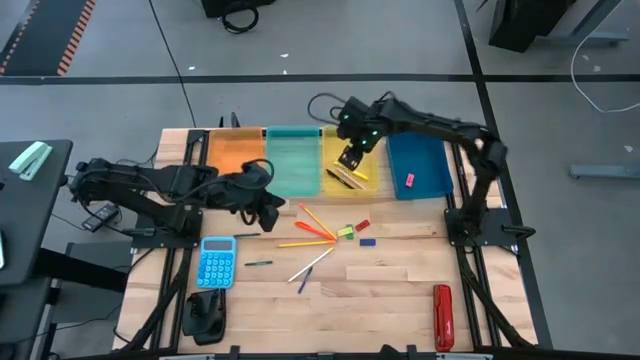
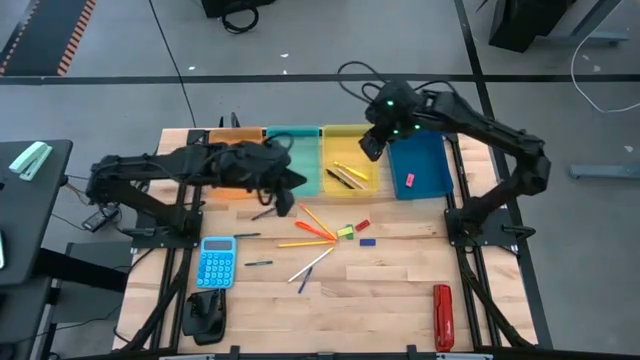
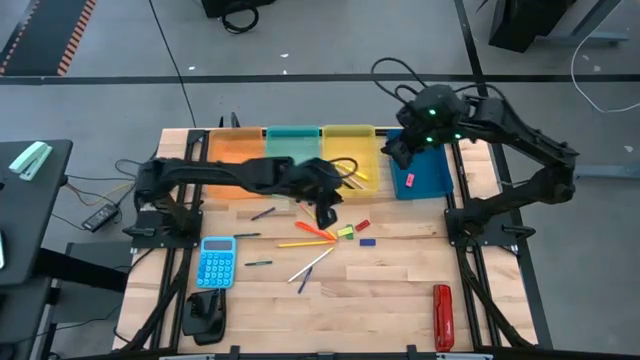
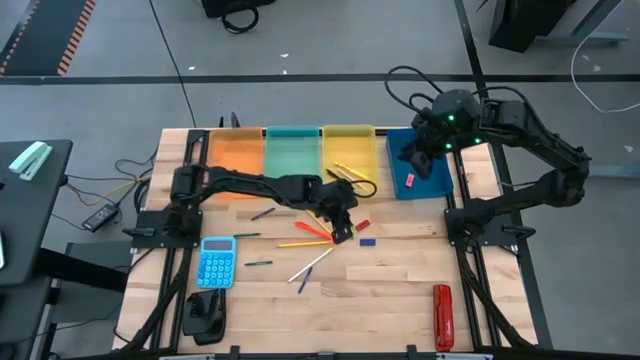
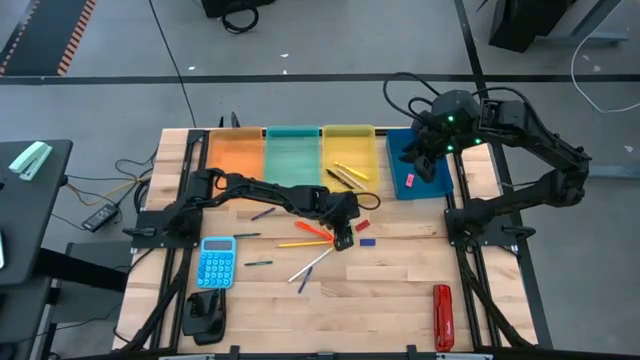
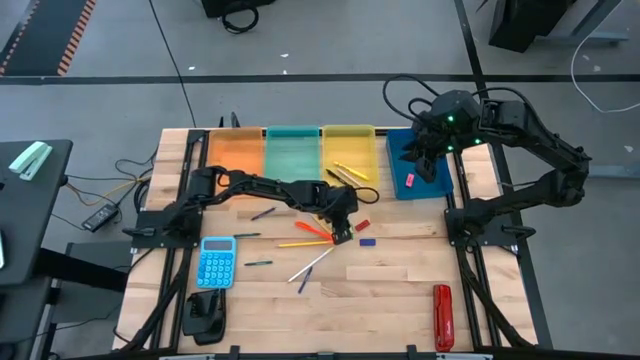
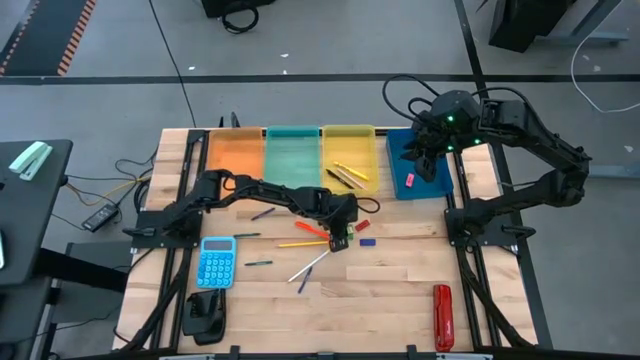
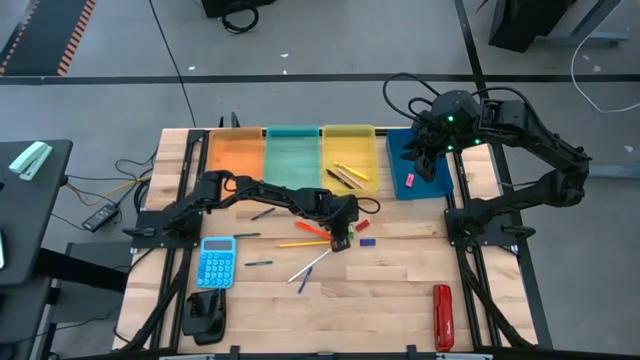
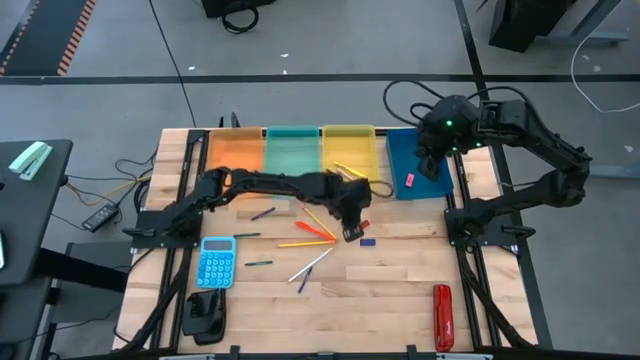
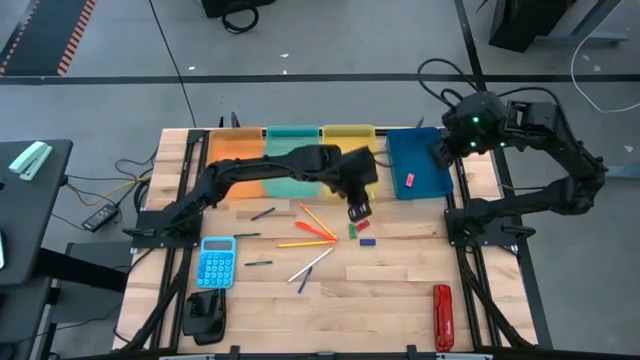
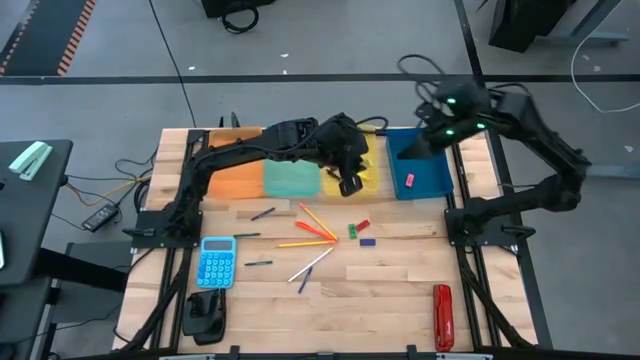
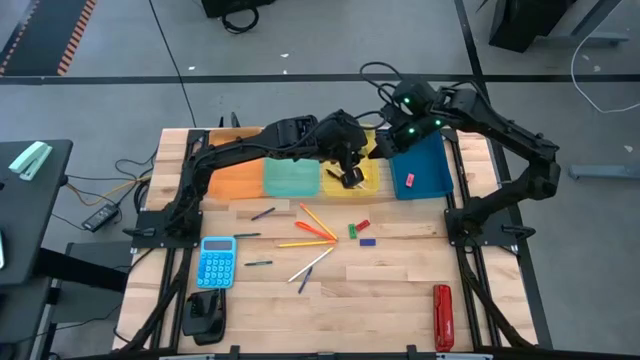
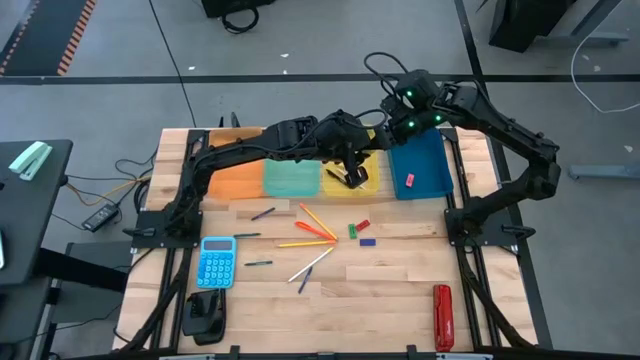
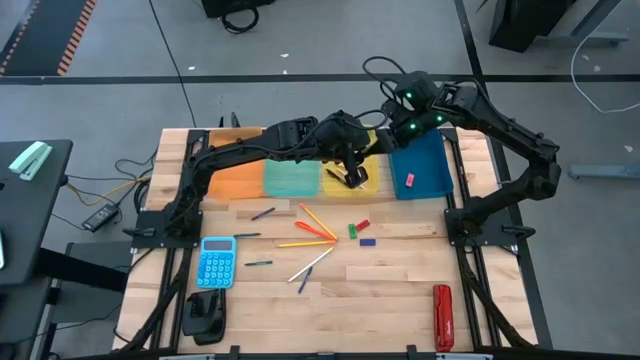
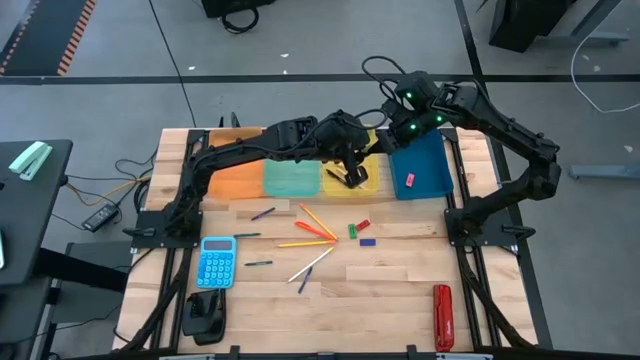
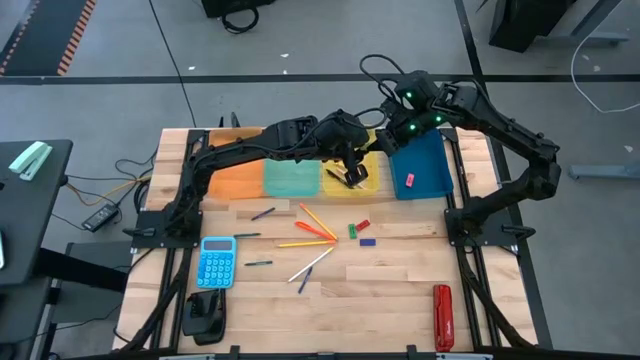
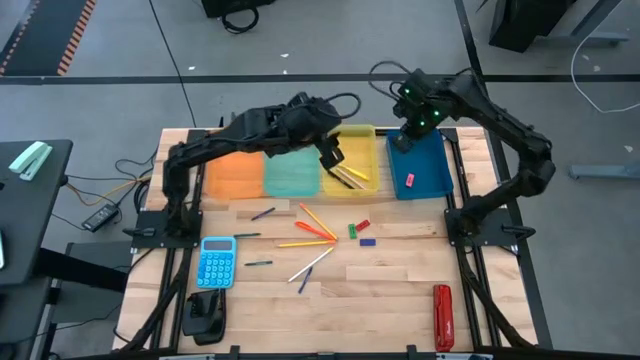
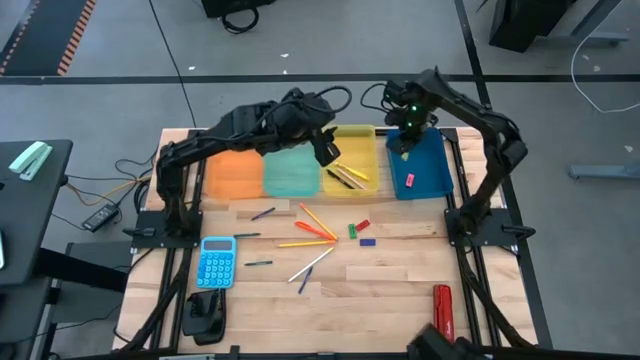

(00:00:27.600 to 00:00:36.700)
Task: Sort crayons/erasers/pens/pencils in bins
Put the light green eraser into the blue bin

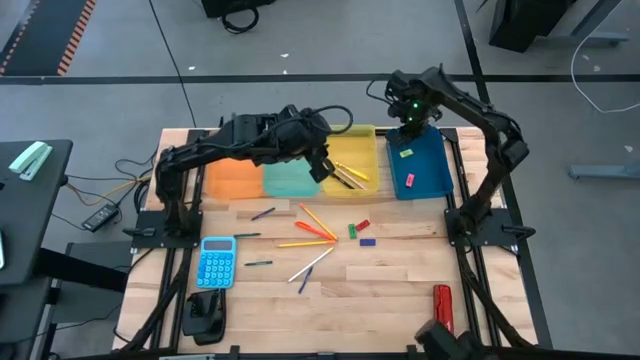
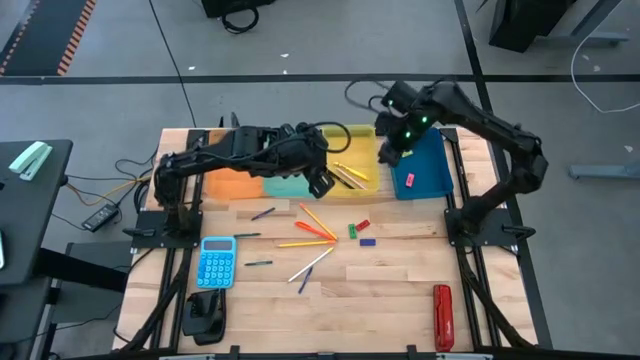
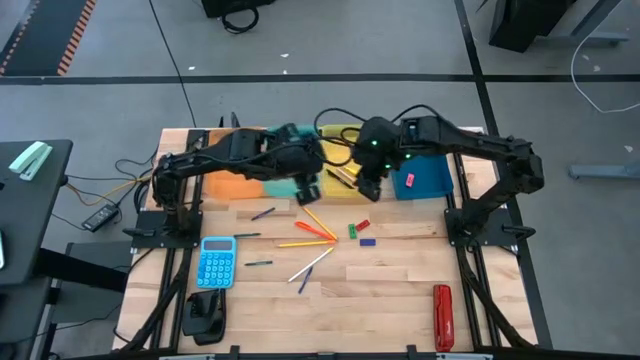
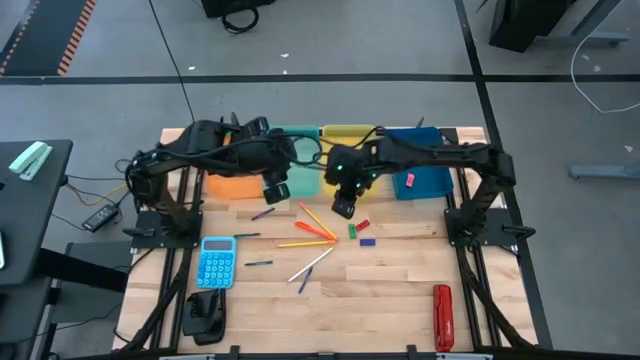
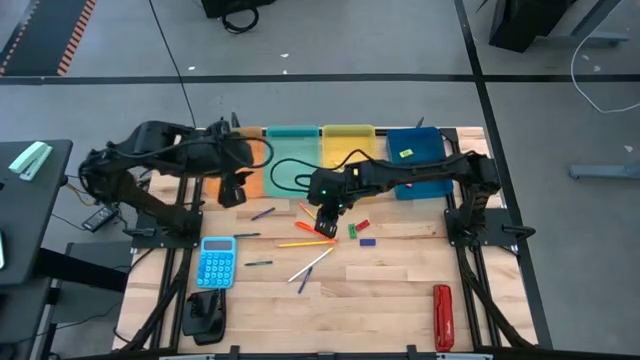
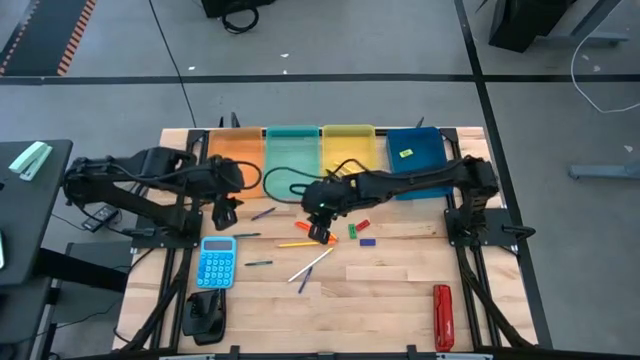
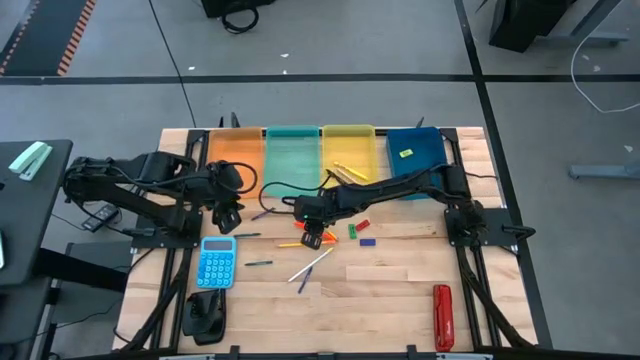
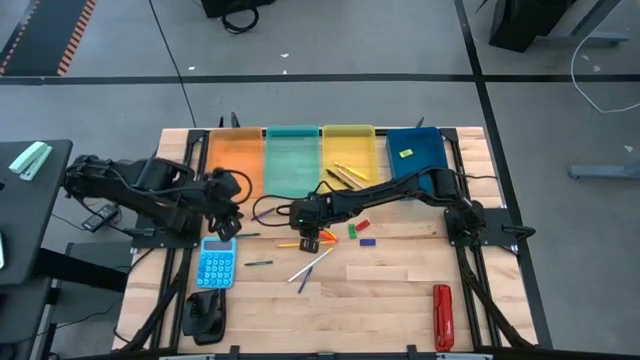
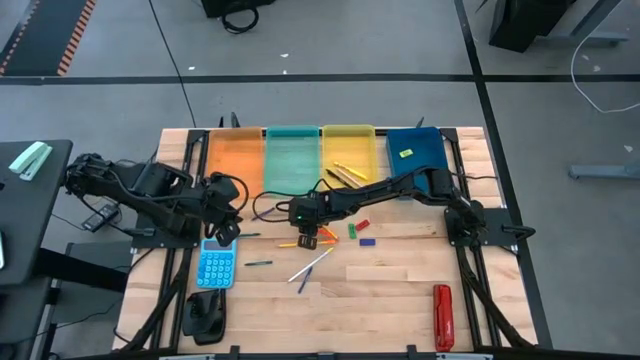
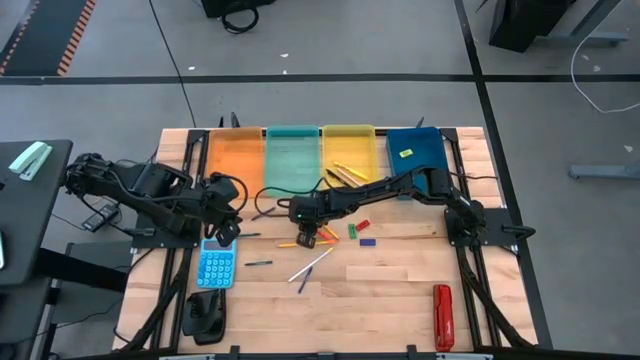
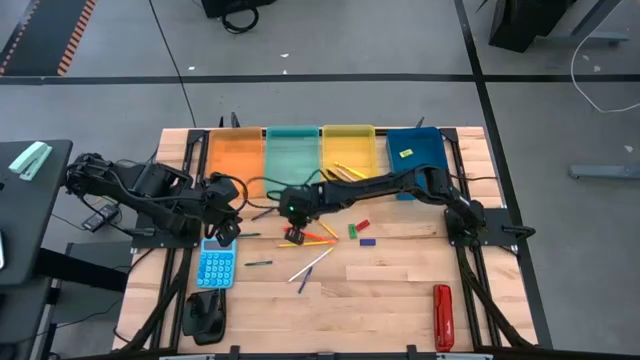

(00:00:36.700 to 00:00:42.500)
Put the orange pen into the yellow bin

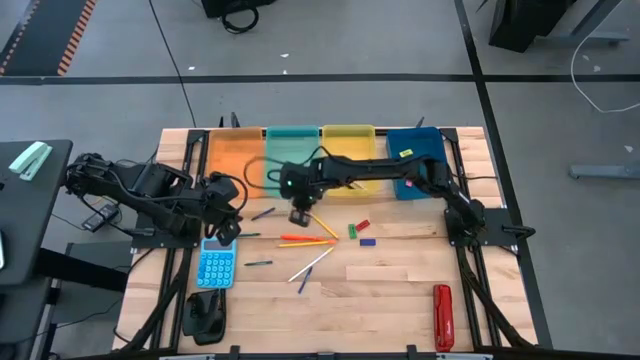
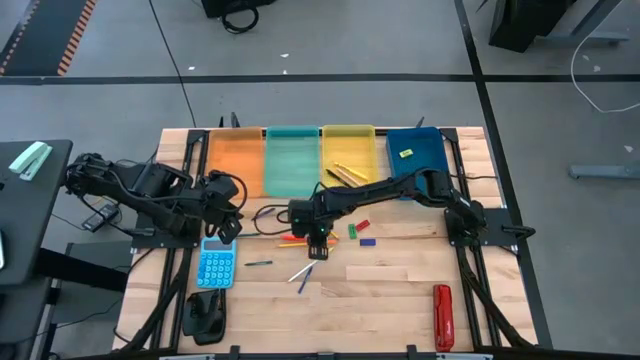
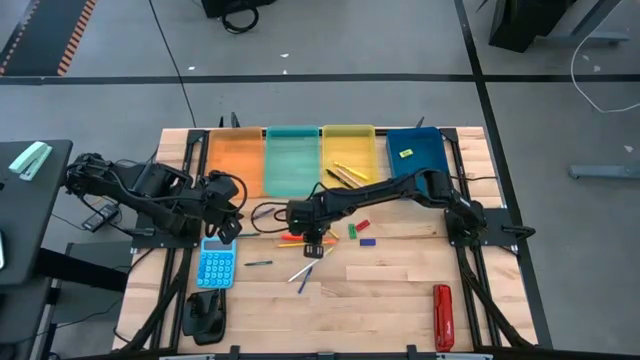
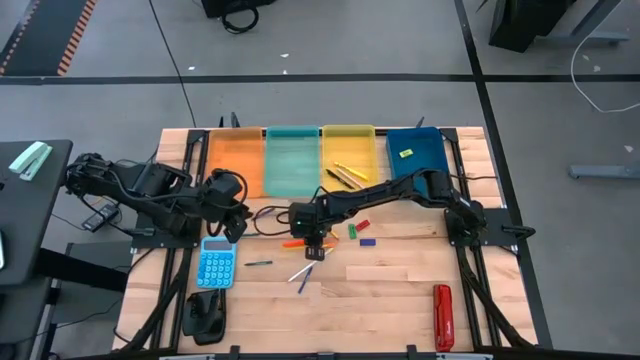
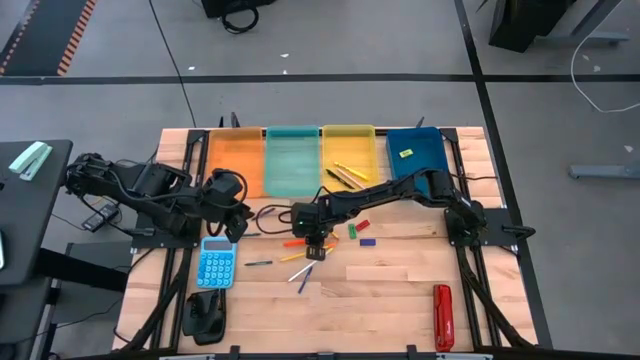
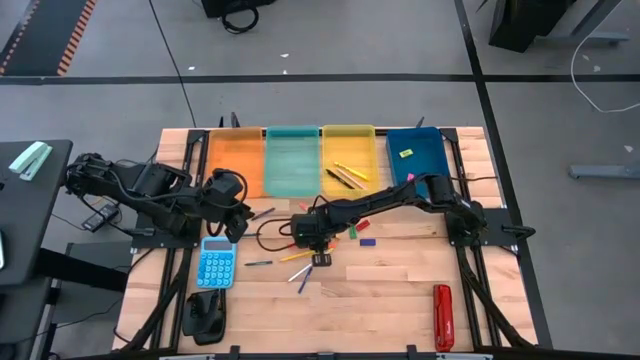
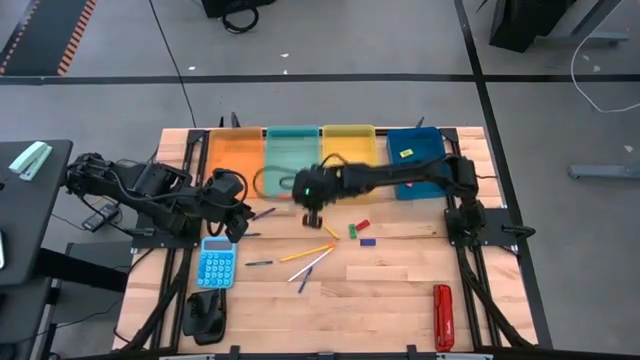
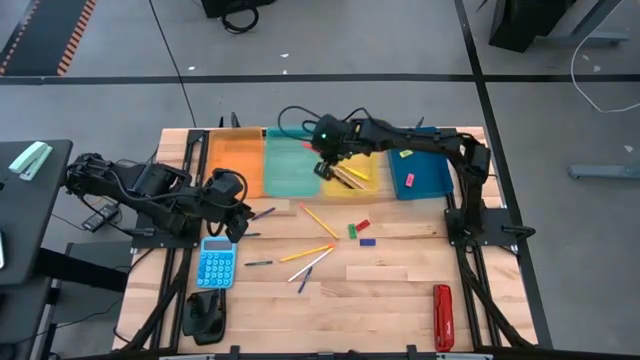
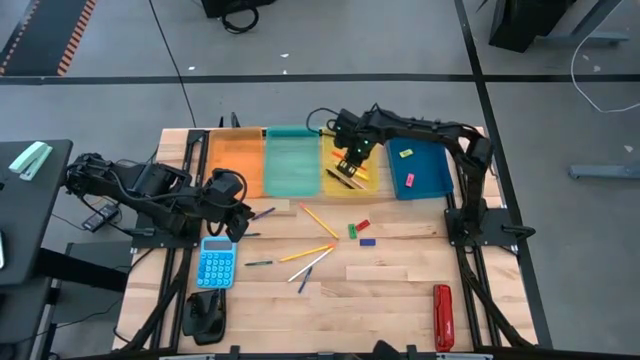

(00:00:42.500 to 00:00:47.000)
Put the orange pen into the yellow bin

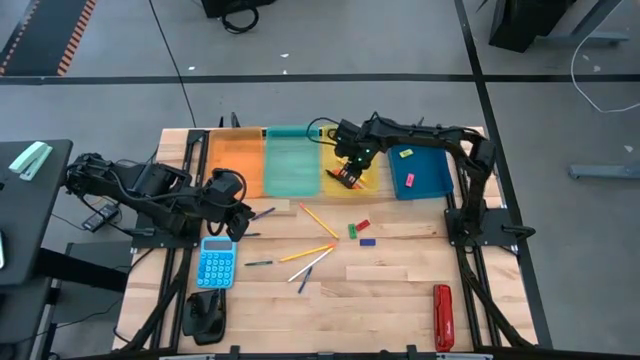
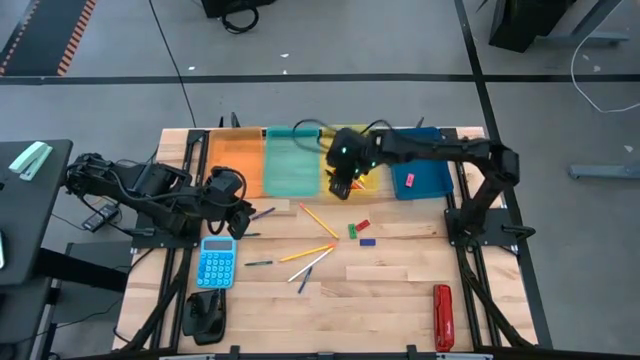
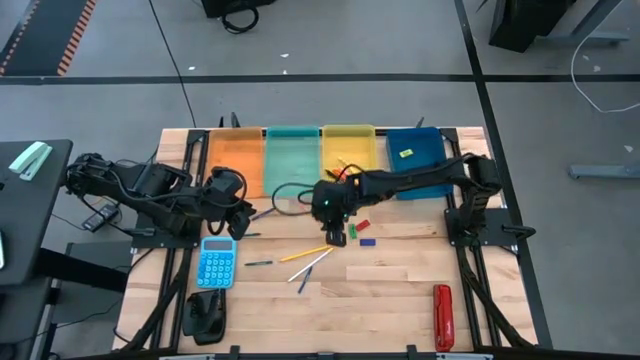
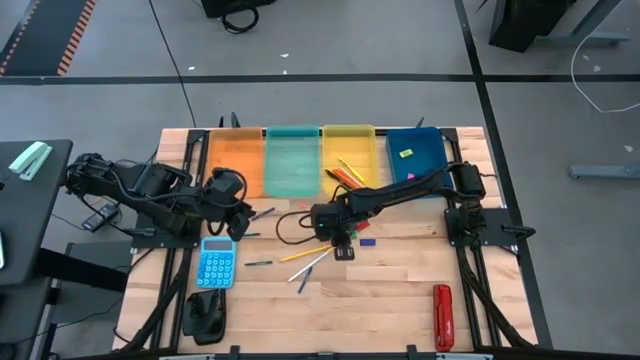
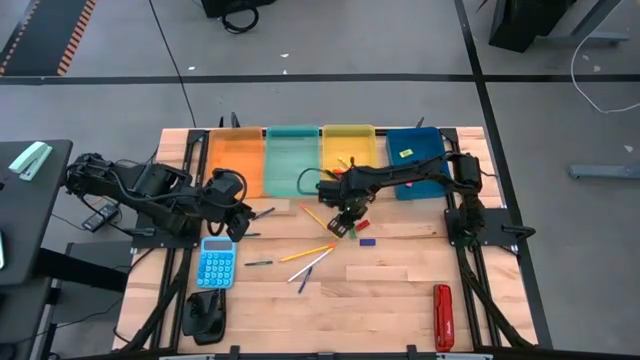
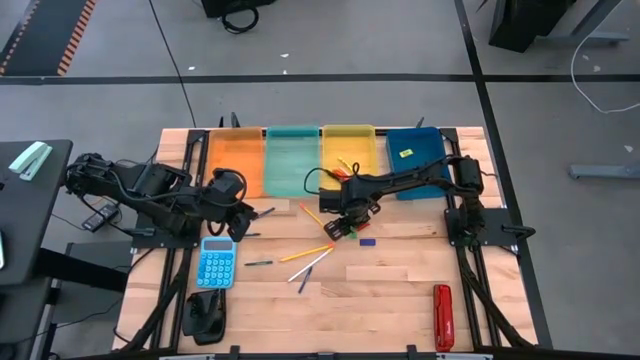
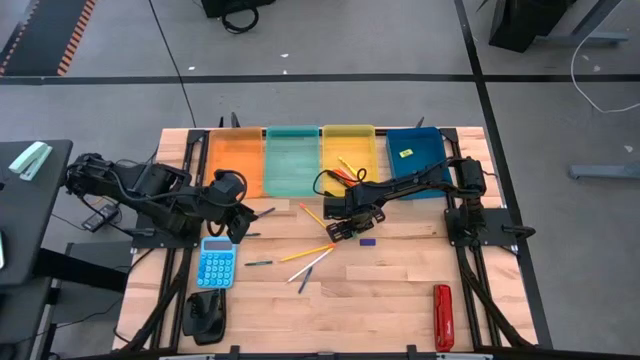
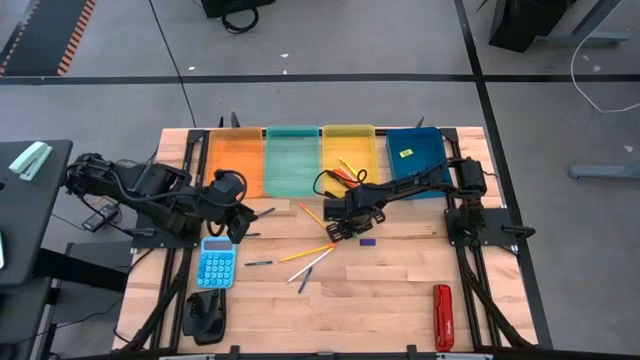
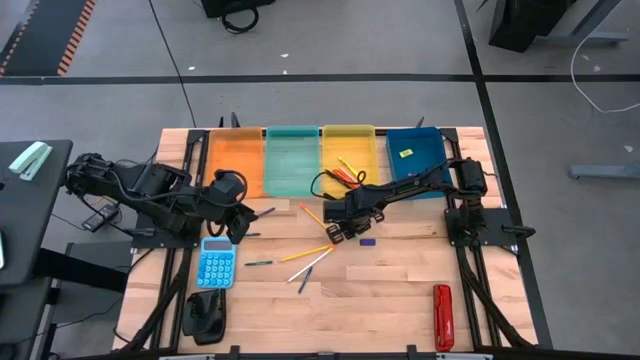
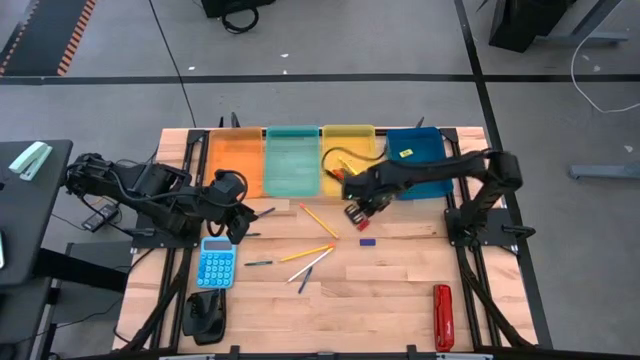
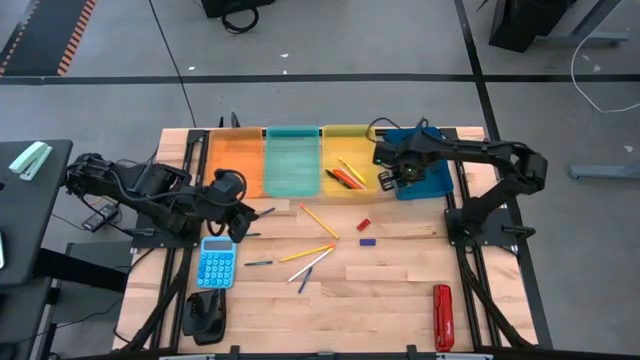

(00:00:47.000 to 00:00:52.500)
Put the green eraser into the blue bin
